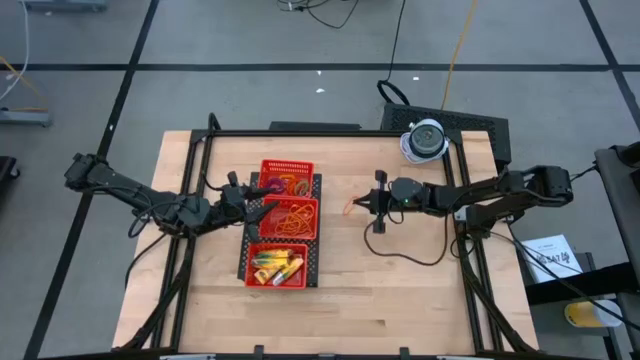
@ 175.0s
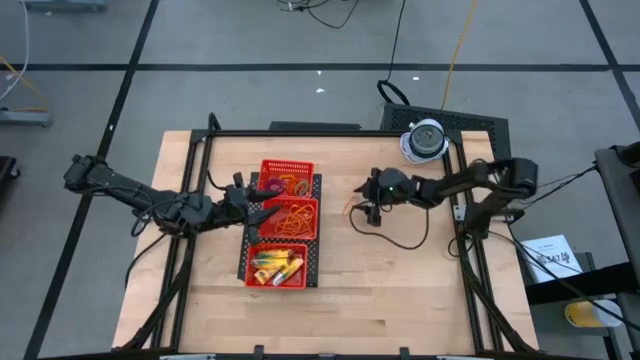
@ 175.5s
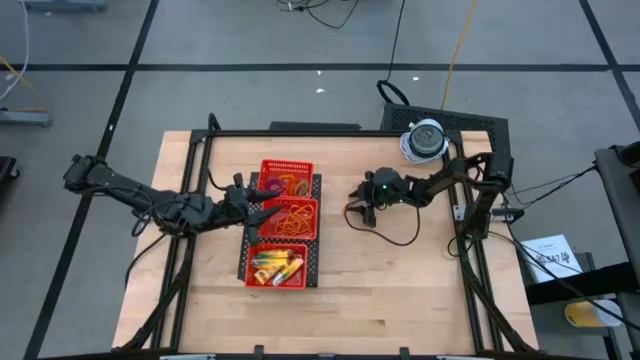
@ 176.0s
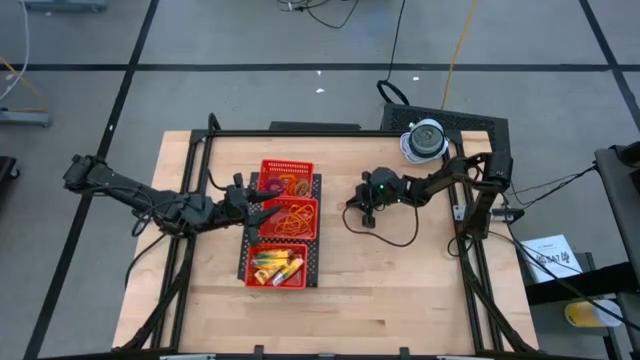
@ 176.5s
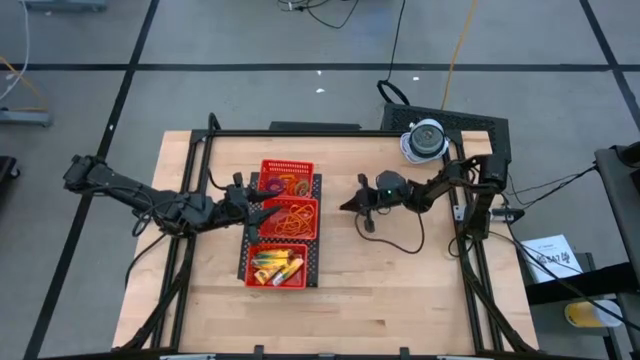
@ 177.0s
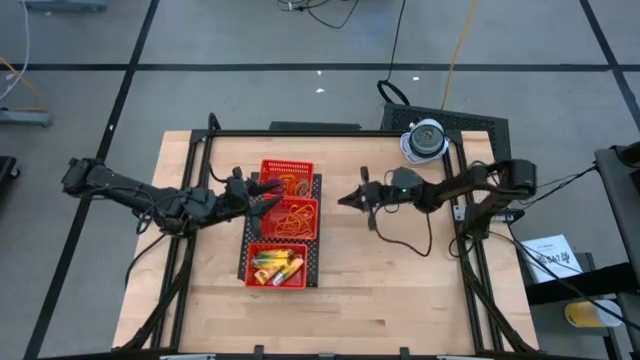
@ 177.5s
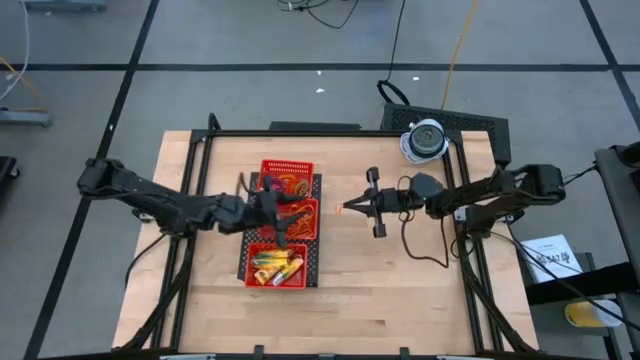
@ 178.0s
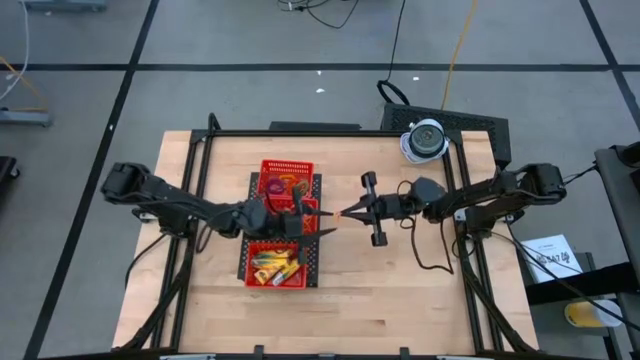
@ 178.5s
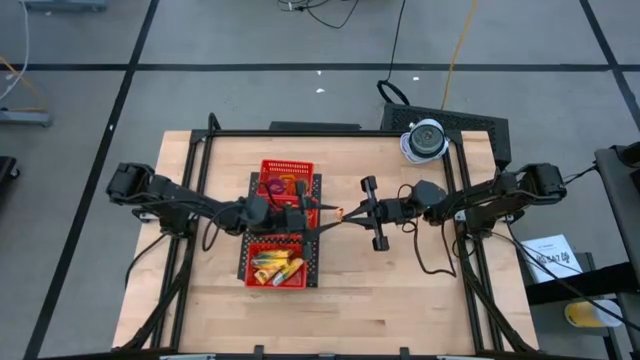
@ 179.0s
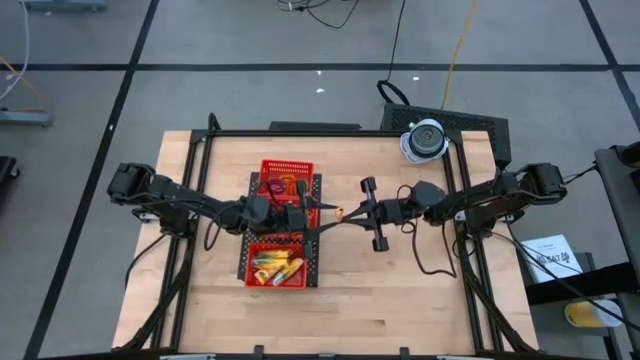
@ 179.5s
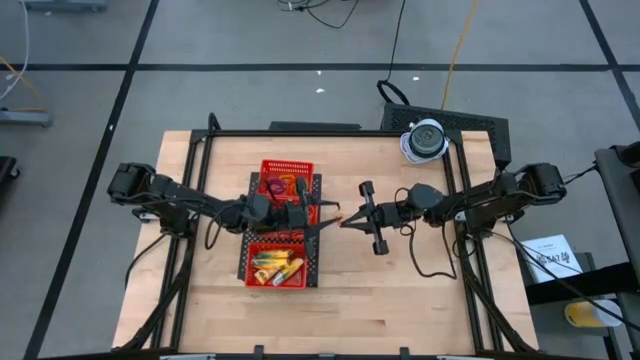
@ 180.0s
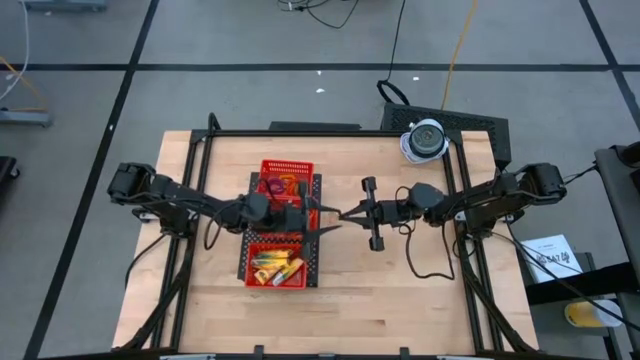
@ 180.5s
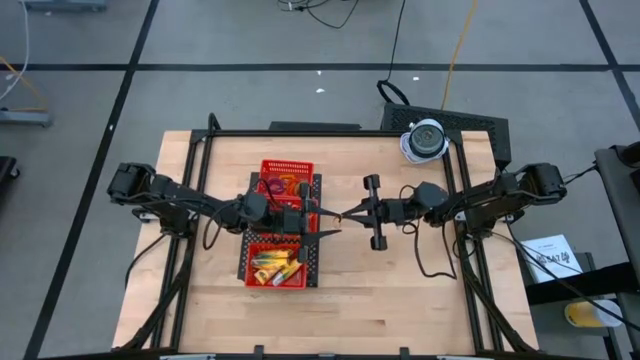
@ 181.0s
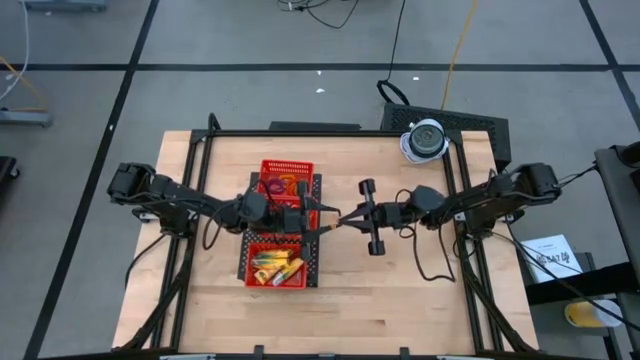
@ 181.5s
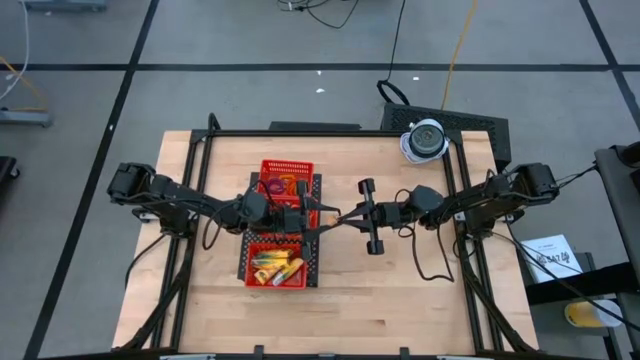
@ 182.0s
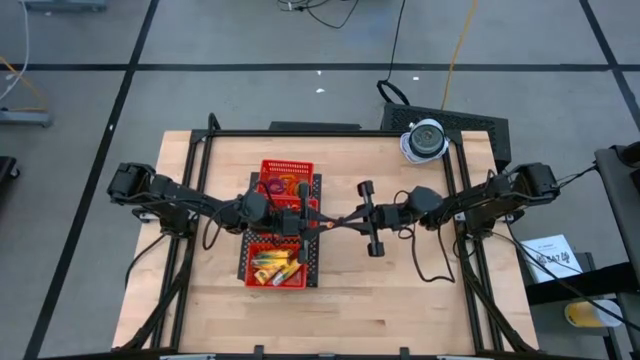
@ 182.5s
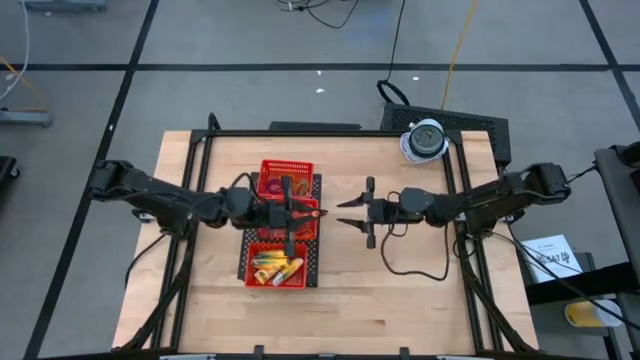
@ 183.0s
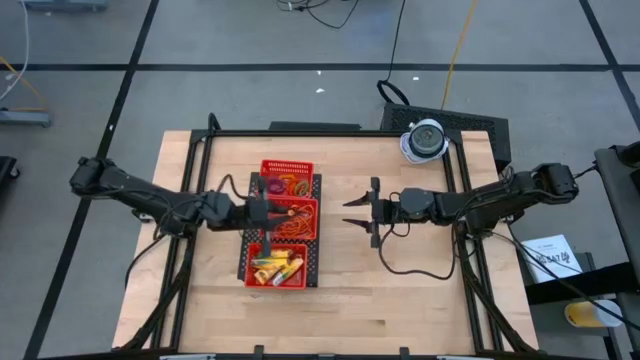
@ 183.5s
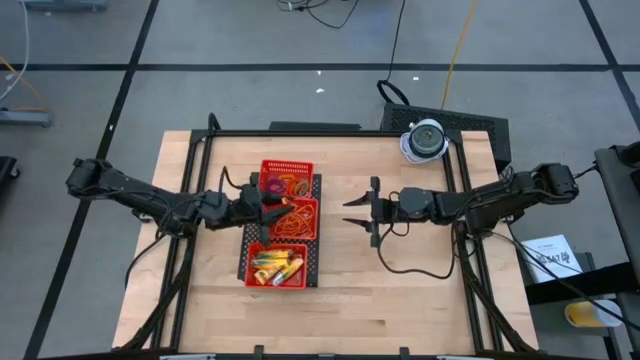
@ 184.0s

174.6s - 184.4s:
Task: Pick & Place Office Desk Supplies
Put the orange rubber band into the middle red basket on the shelf

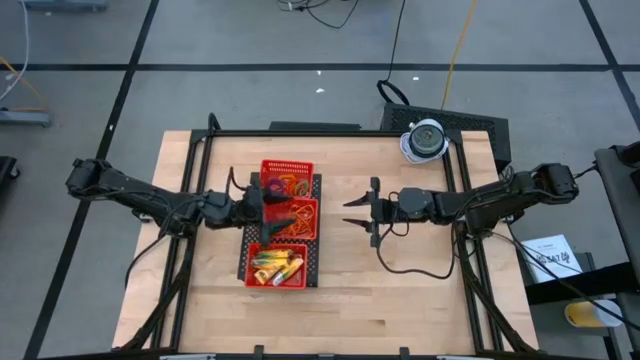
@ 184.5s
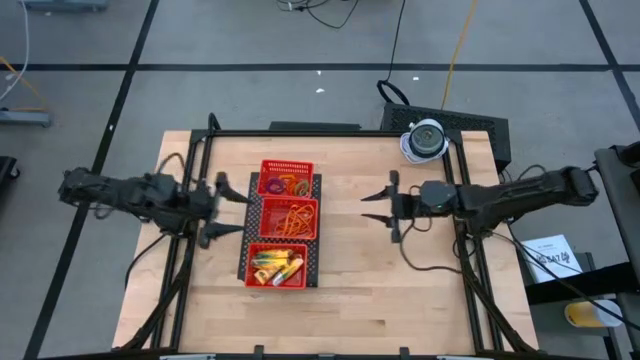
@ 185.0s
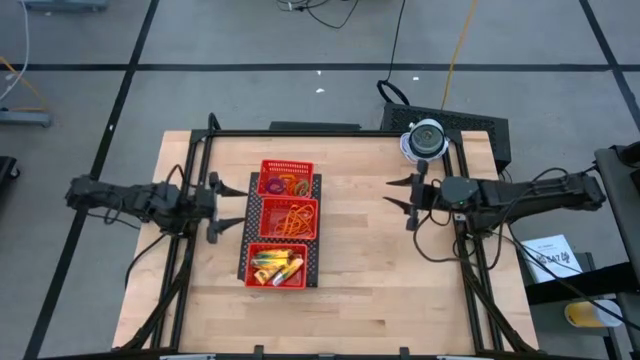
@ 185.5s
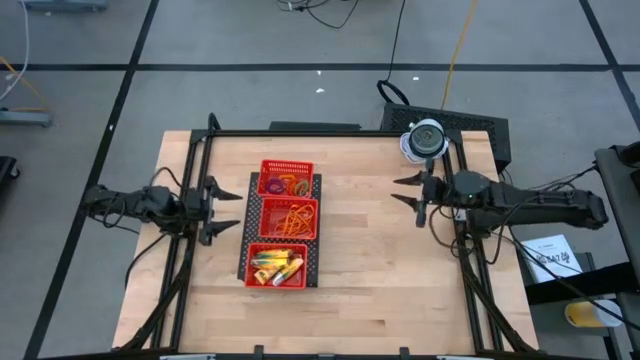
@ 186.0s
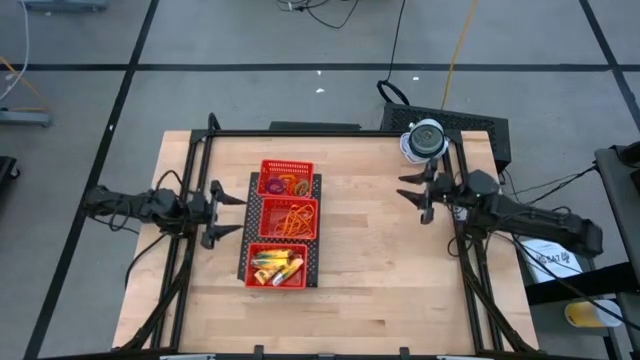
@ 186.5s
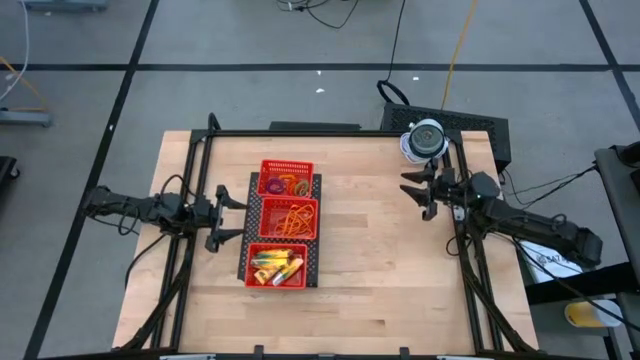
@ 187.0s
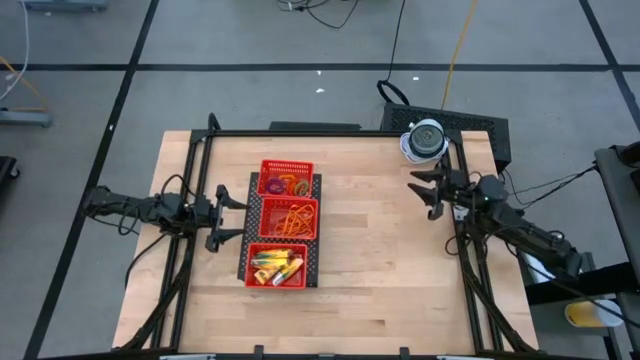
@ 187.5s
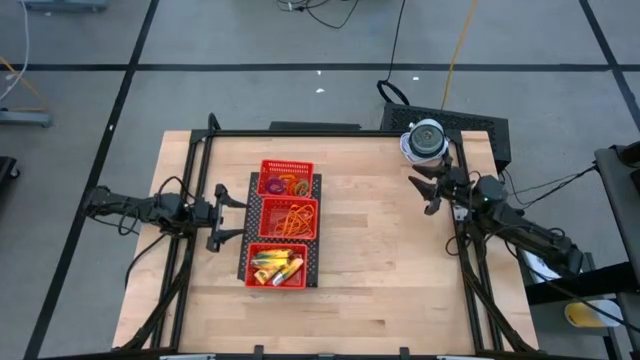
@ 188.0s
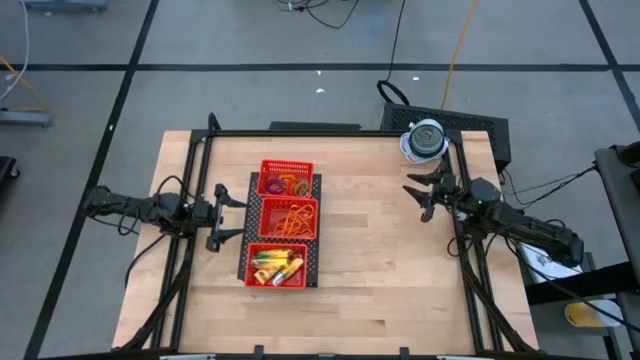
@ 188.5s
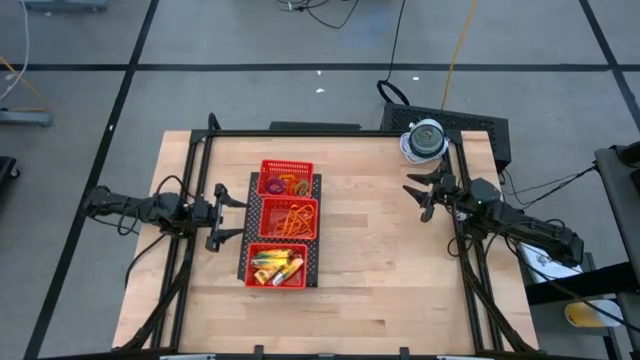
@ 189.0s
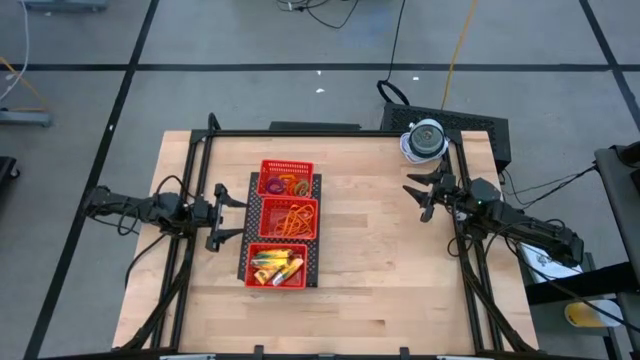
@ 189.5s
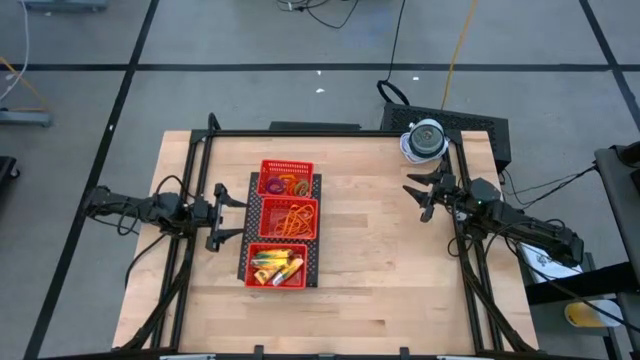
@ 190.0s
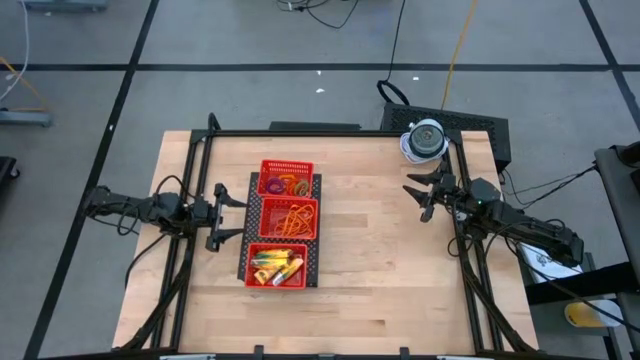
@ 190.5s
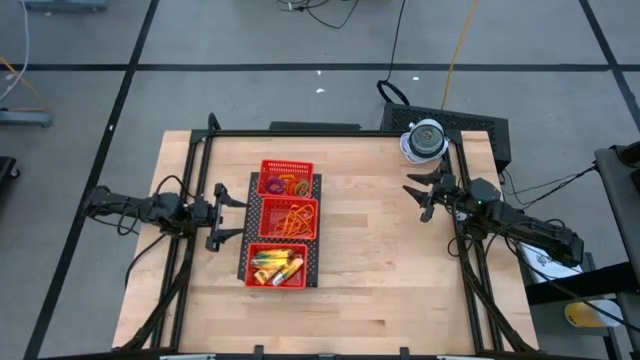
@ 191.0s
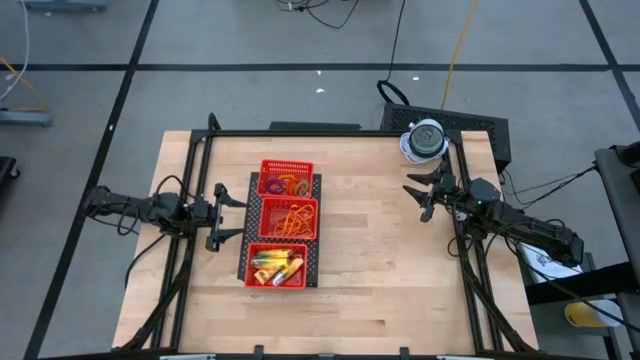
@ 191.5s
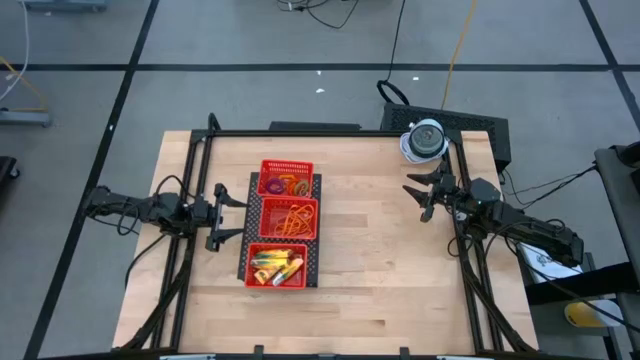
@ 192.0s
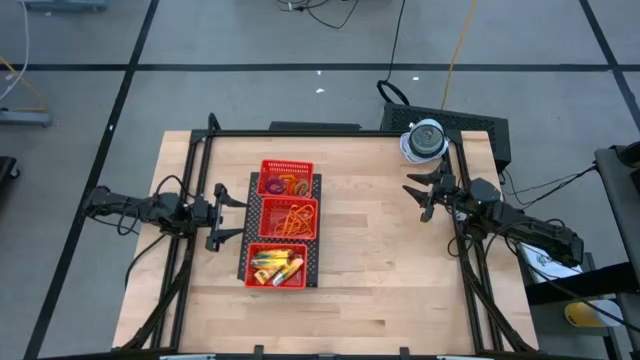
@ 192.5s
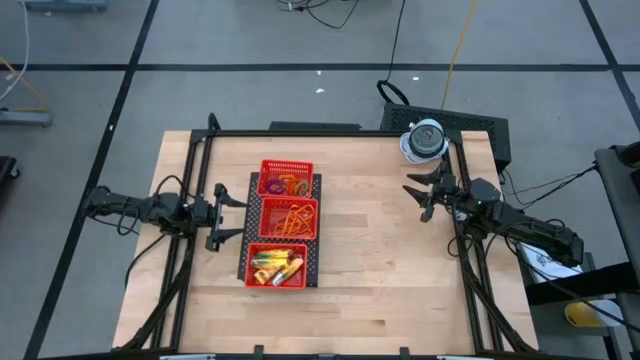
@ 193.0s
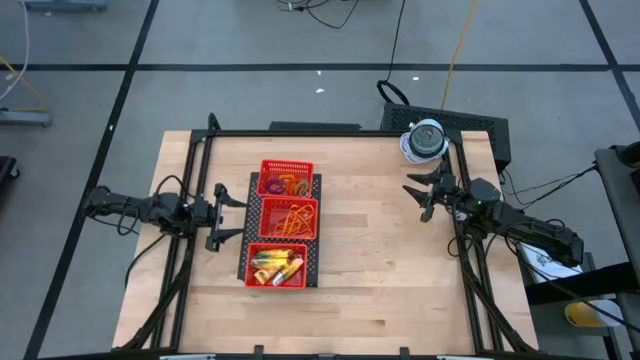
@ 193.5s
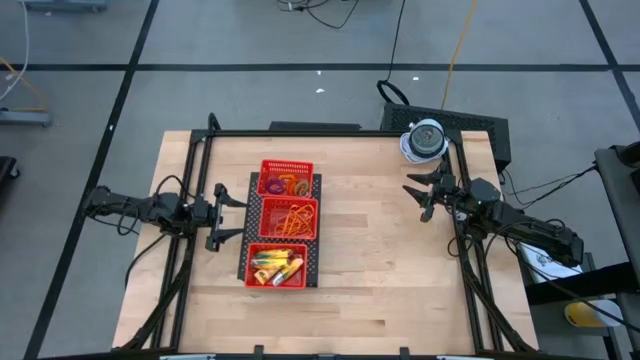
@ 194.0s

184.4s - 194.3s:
Return to Home Position

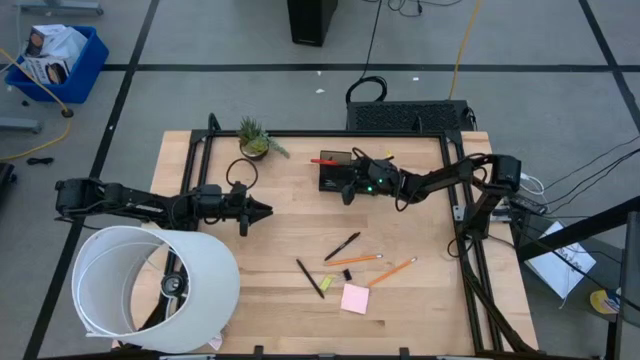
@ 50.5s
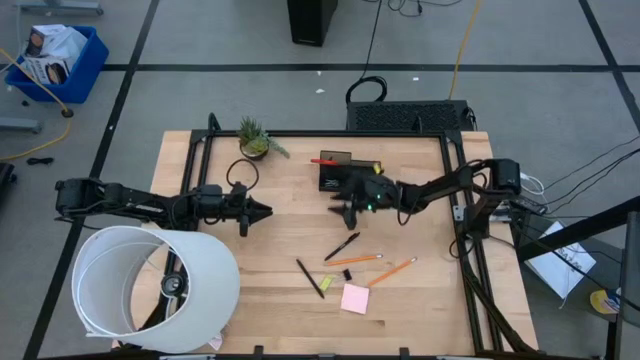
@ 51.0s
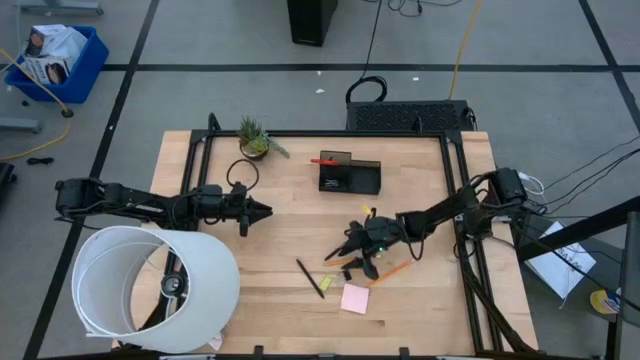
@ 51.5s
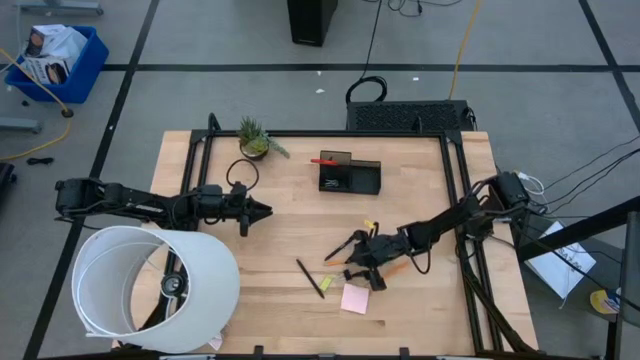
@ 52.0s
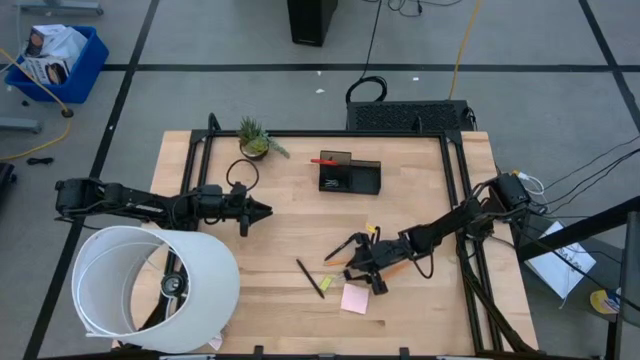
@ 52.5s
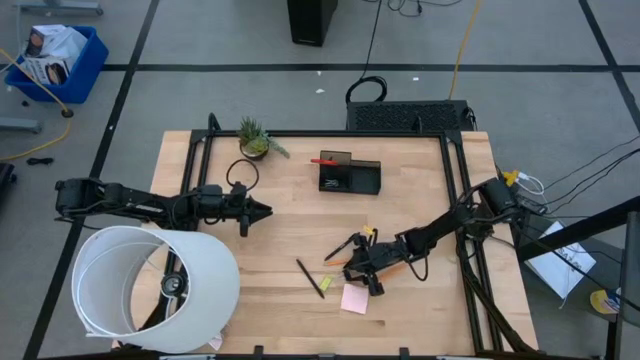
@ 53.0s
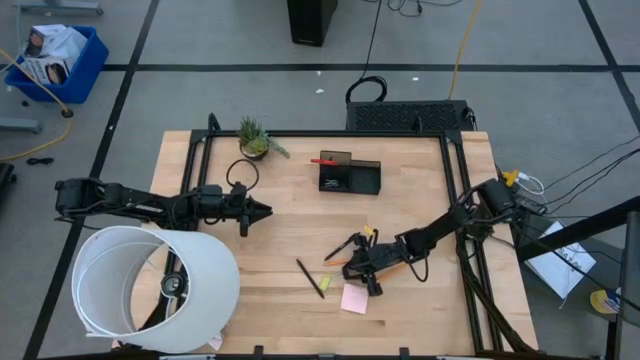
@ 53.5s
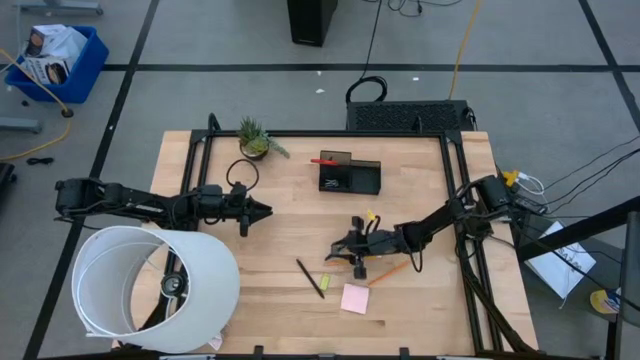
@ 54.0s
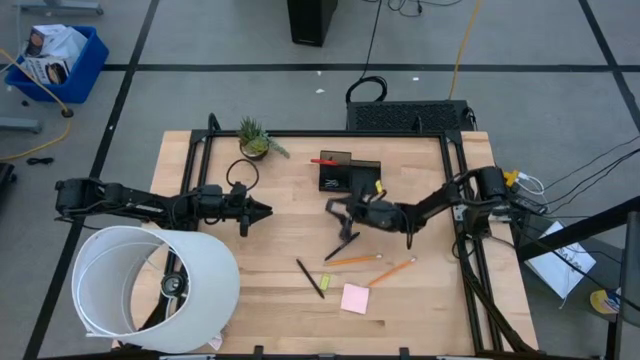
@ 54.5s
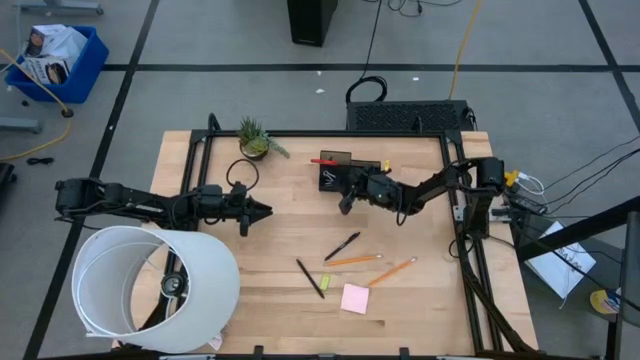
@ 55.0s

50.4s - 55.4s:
Task: Pick and place office supplies into organizer
Put the binder clip into the desk organizer
